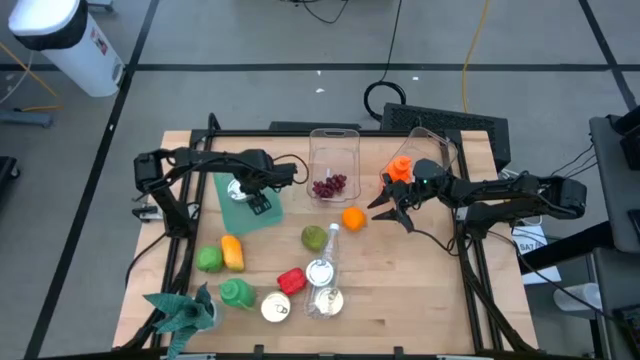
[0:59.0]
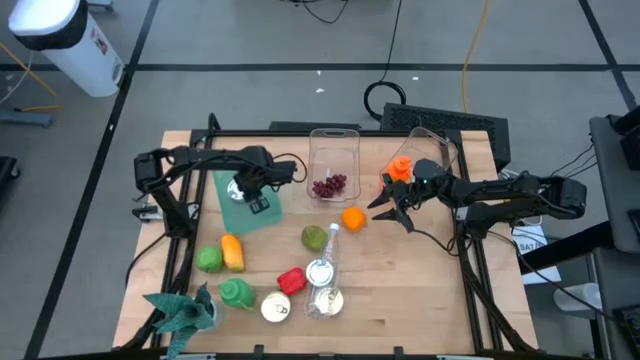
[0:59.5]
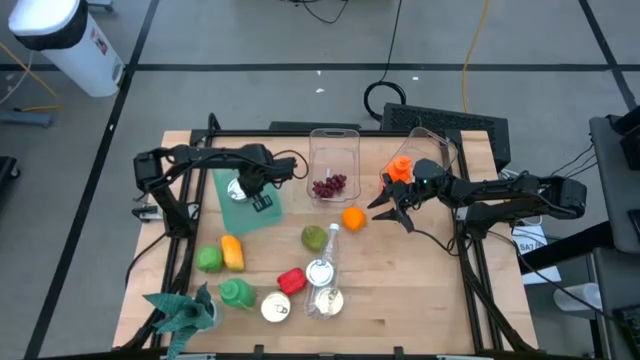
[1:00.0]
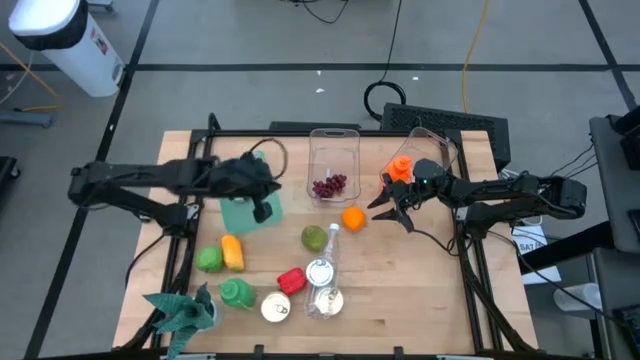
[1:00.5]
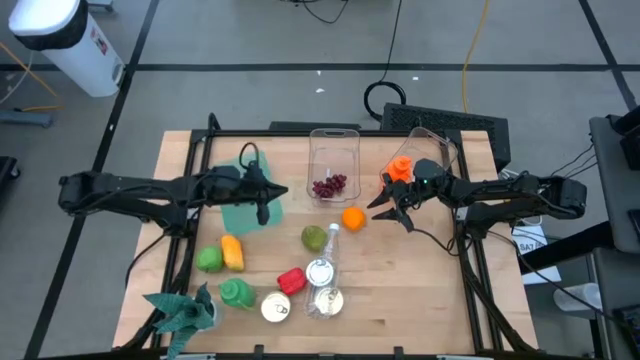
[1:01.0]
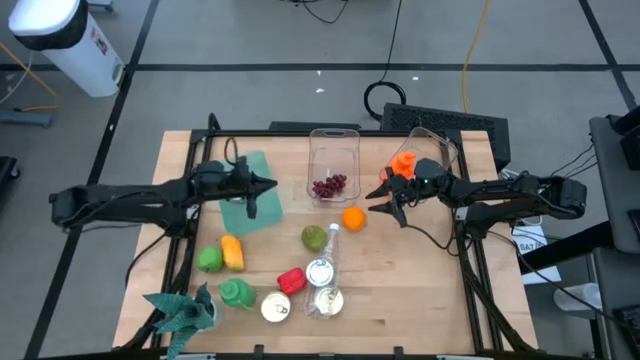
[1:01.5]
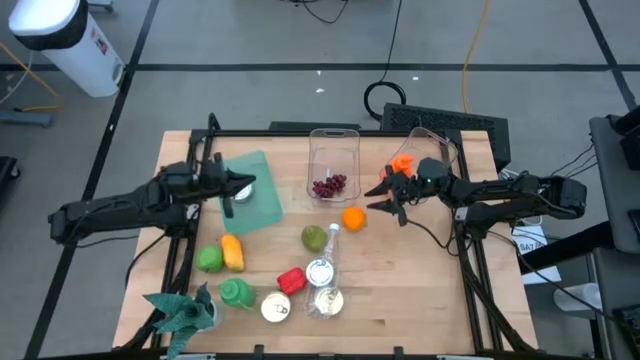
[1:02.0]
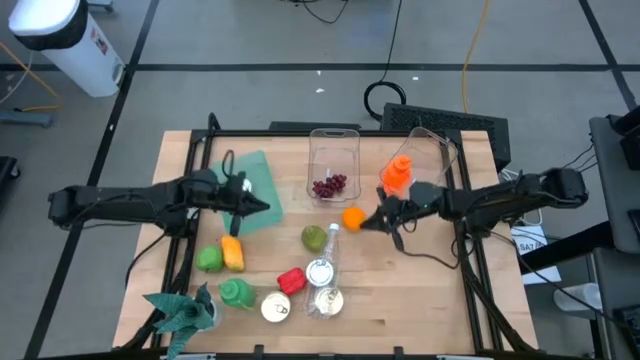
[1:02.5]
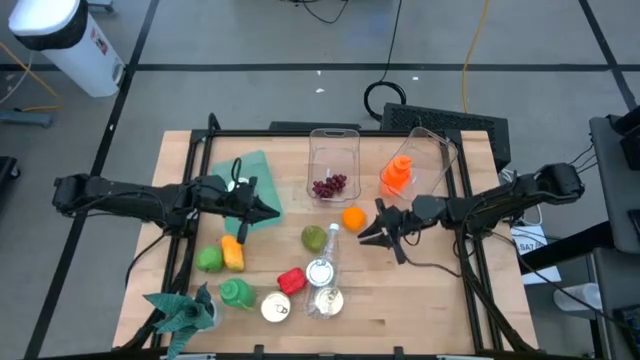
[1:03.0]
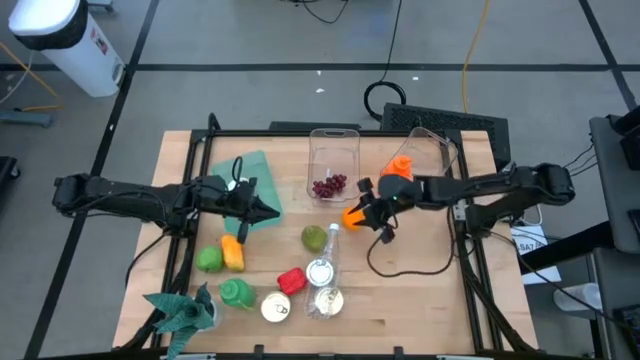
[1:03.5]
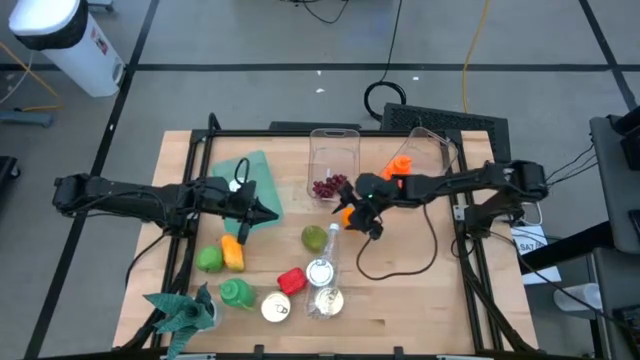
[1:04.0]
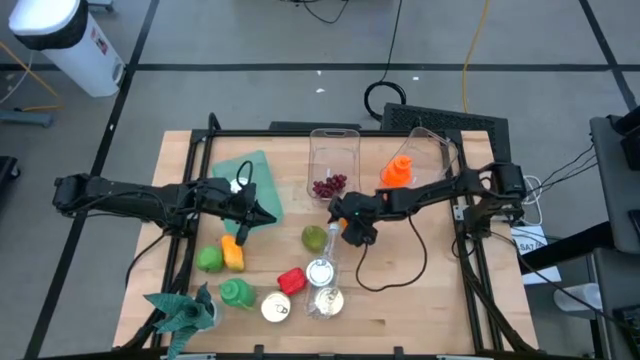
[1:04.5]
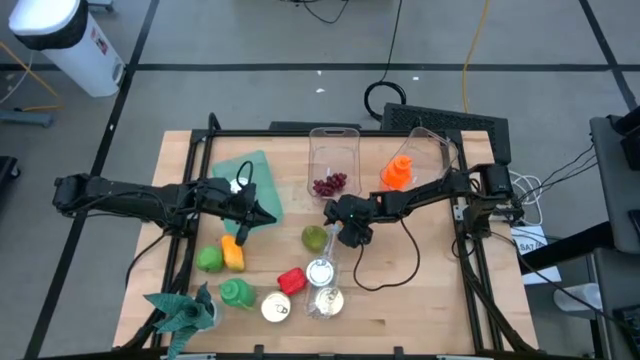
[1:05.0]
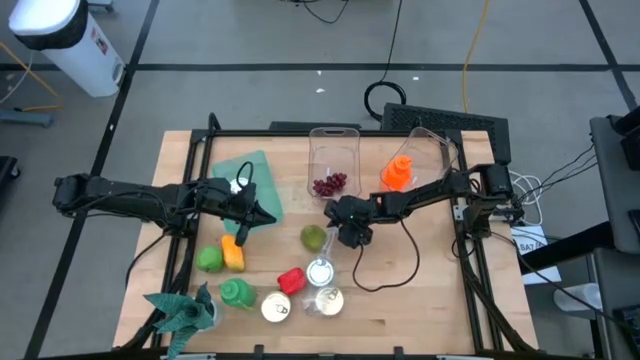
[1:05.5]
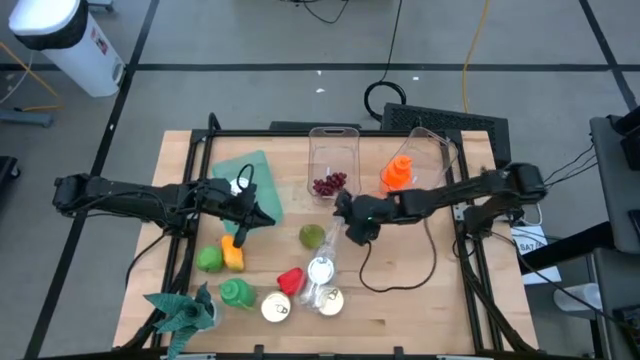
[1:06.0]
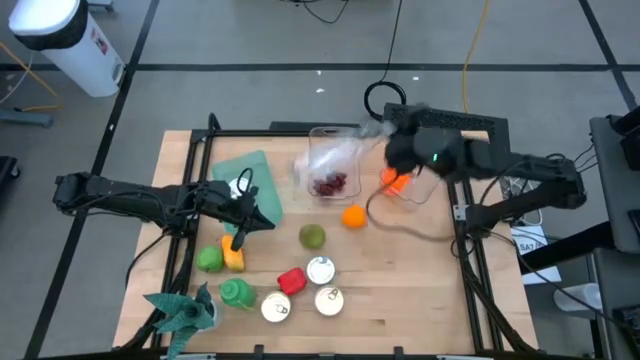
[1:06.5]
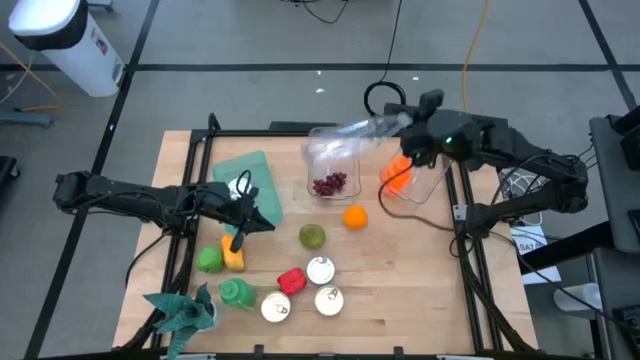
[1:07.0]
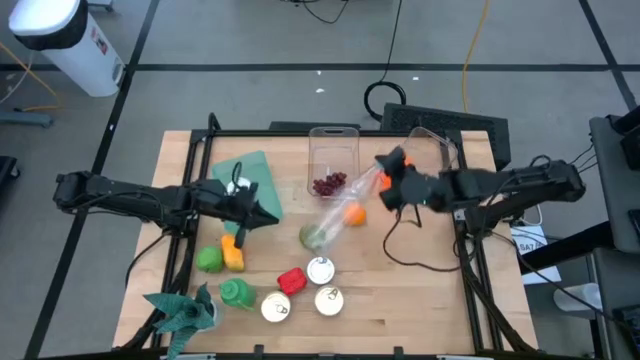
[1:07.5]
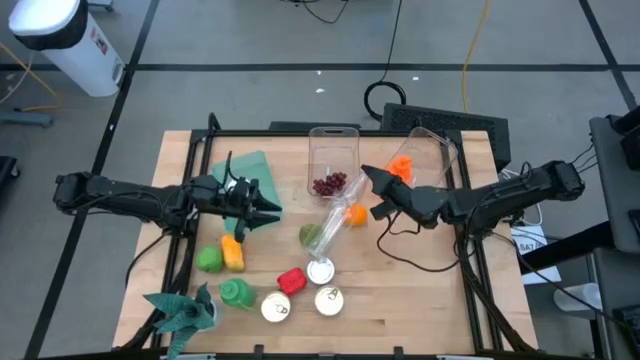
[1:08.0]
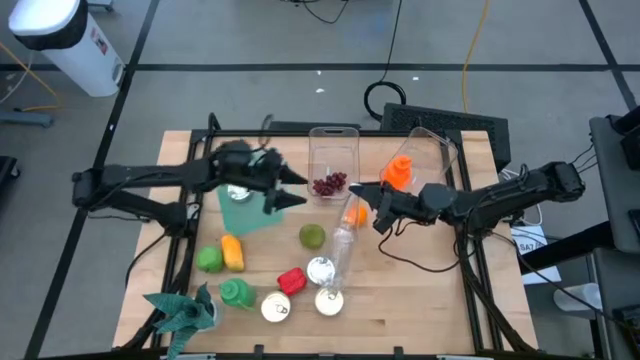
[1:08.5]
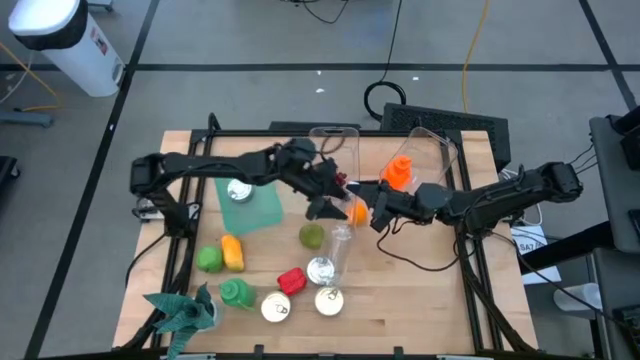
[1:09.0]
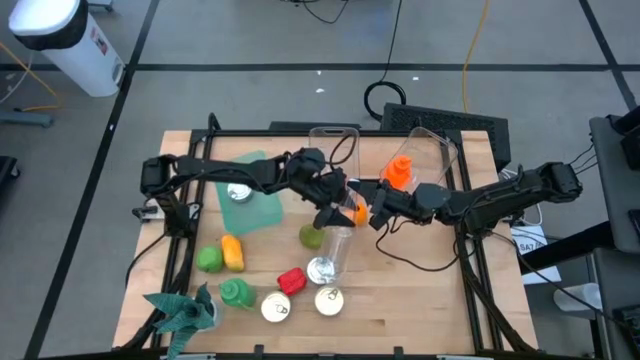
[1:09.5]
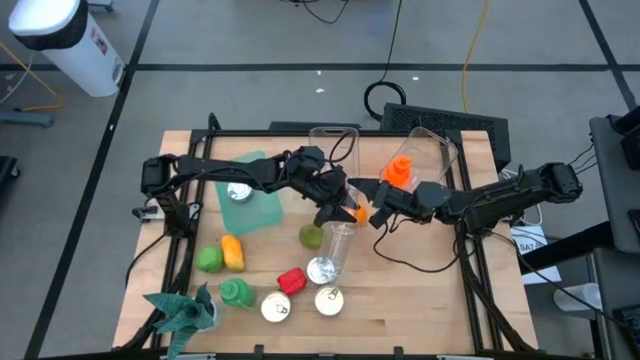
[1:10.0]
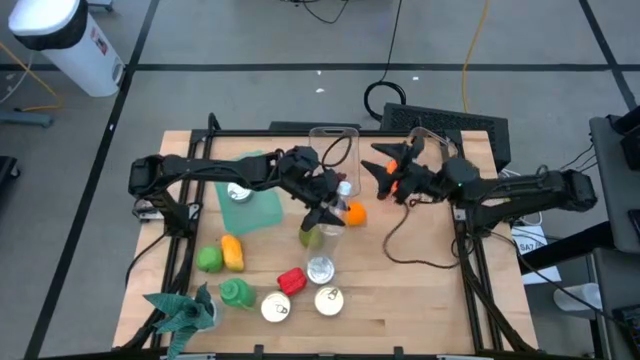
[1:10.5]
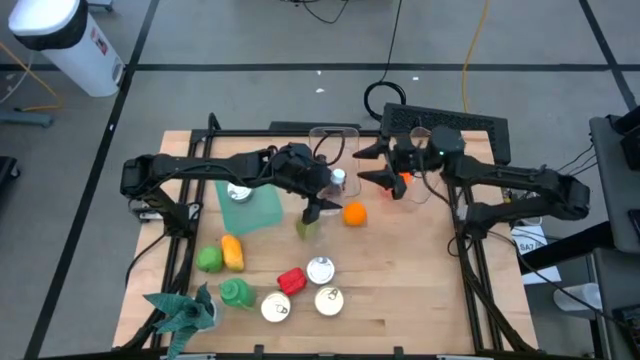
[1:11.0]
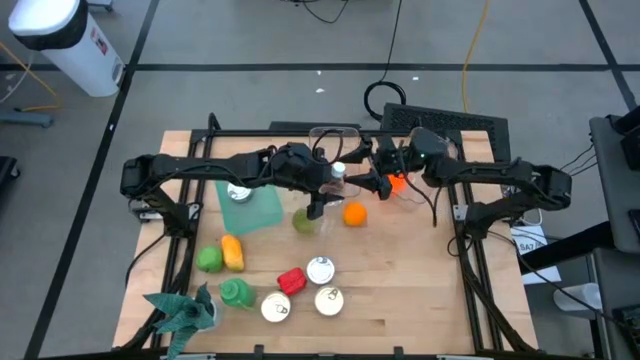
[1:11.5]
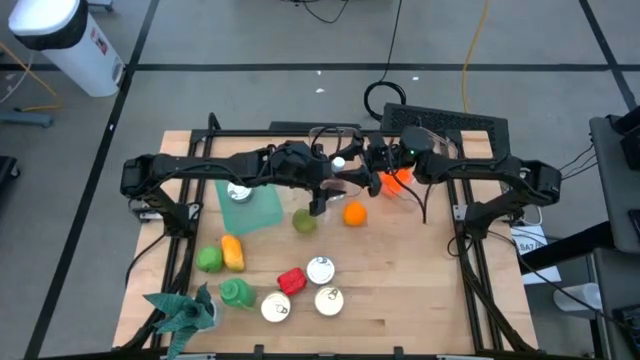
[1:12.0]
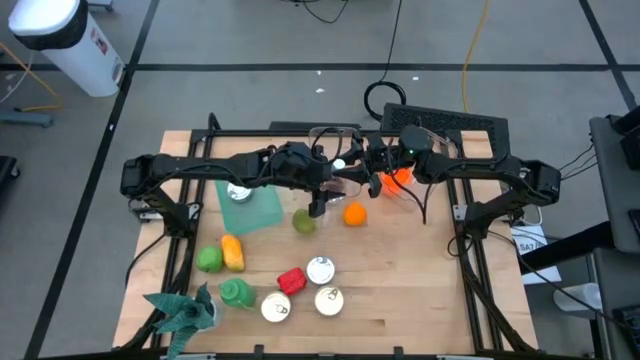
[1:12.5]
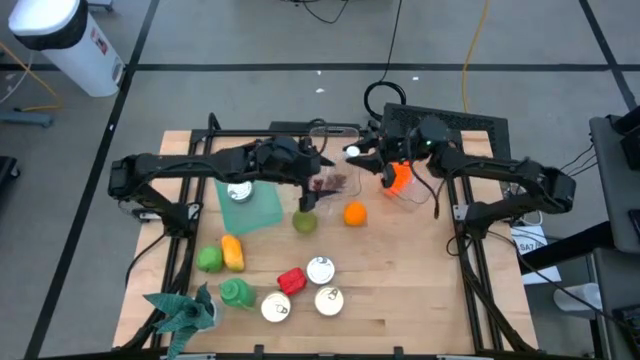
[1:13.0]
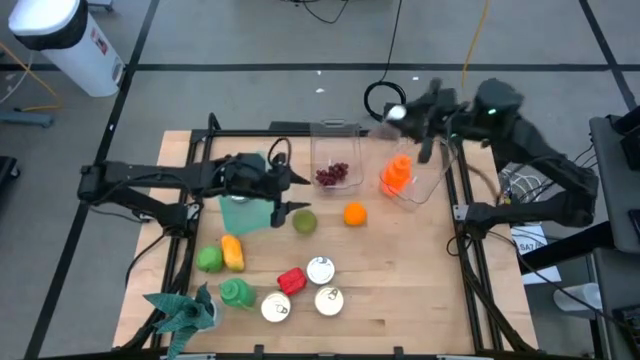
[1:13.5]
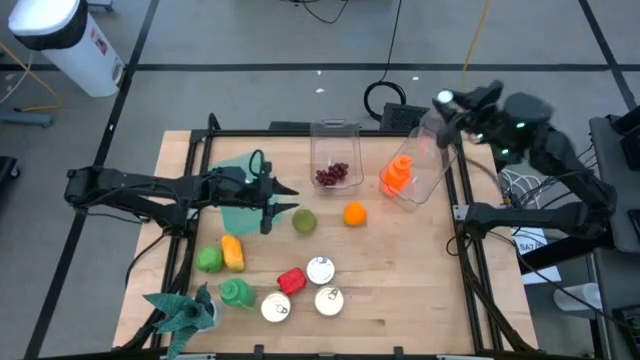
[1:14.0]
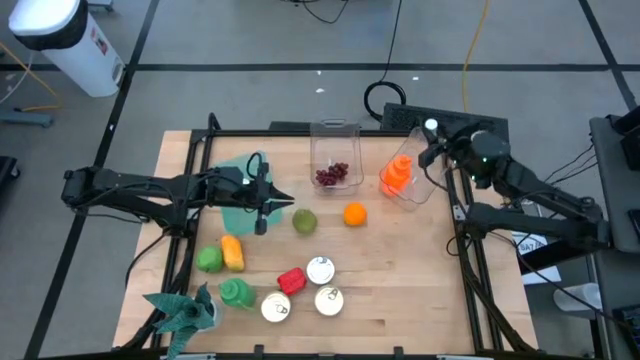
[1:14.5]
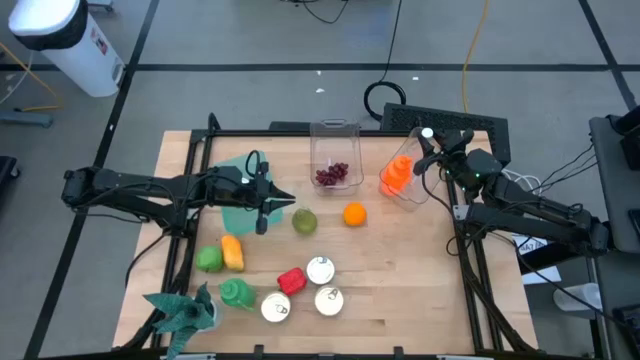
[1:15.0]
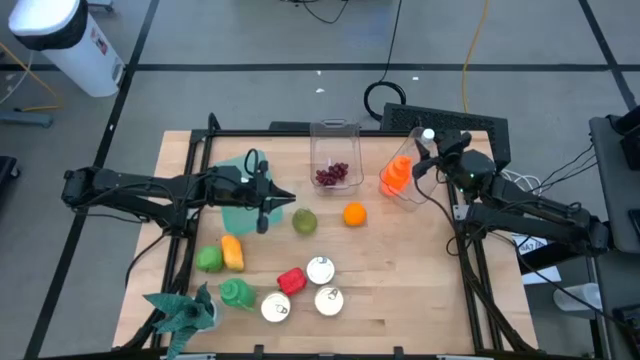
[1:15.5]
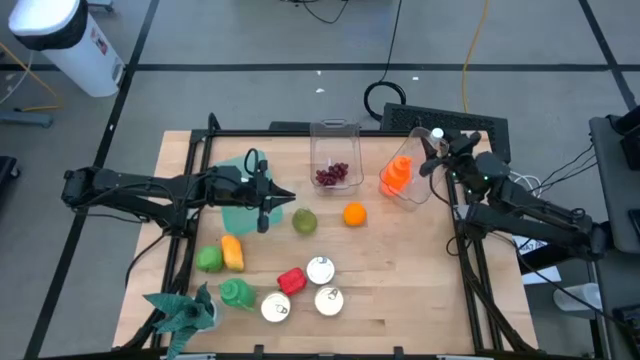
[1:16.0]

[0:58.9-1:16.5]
Task: Pick & Place Food Item
Put the transparent water bottle into the right transparent bin
